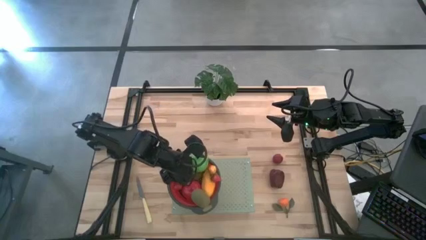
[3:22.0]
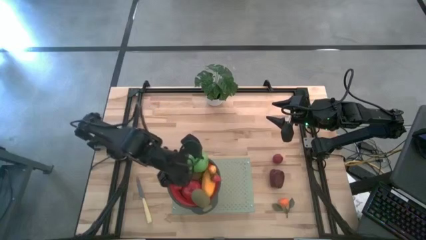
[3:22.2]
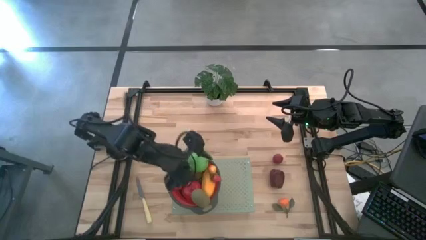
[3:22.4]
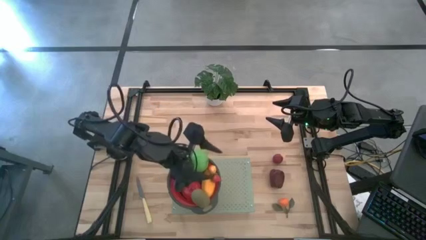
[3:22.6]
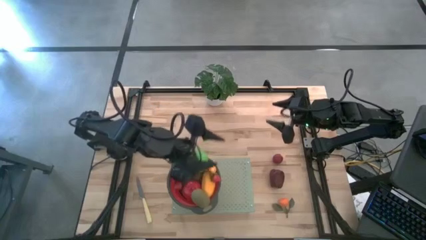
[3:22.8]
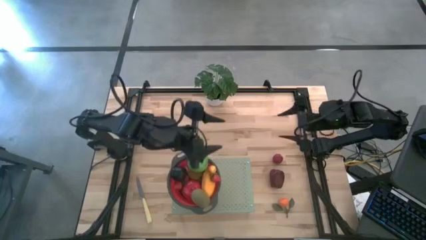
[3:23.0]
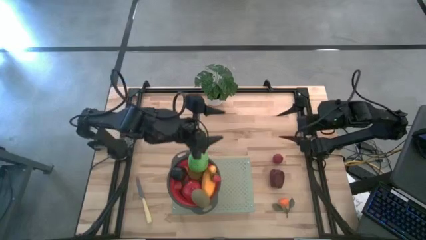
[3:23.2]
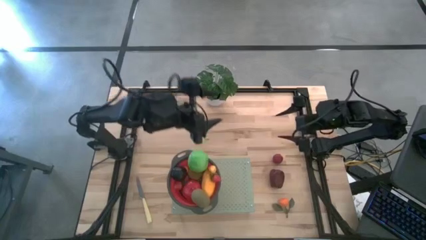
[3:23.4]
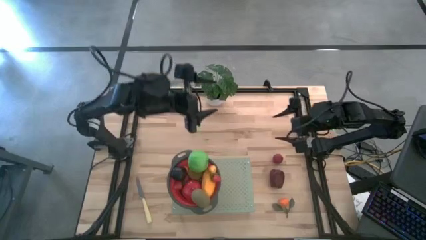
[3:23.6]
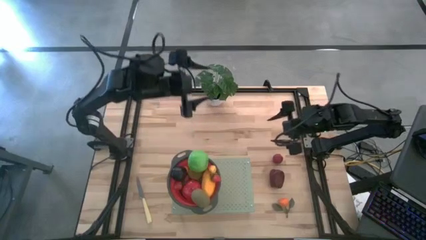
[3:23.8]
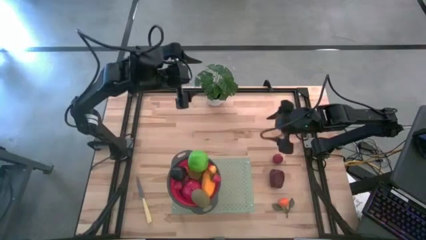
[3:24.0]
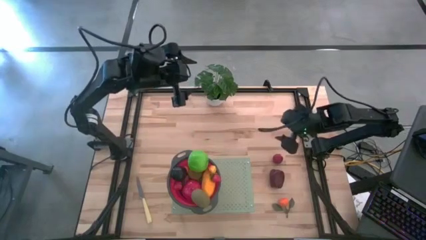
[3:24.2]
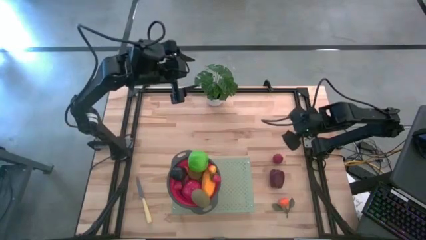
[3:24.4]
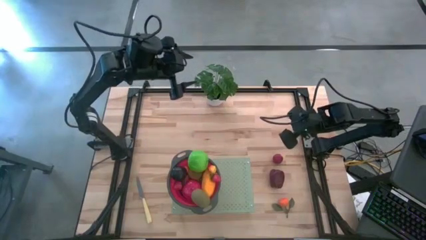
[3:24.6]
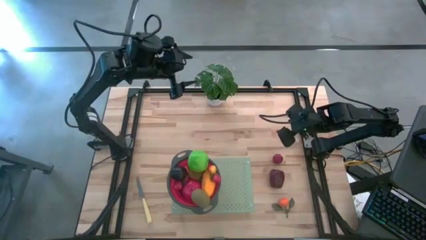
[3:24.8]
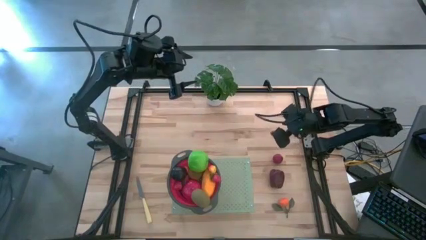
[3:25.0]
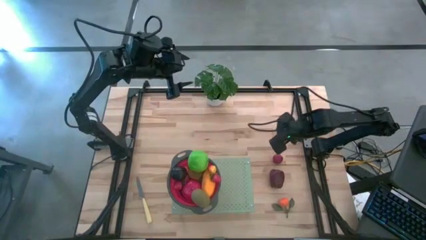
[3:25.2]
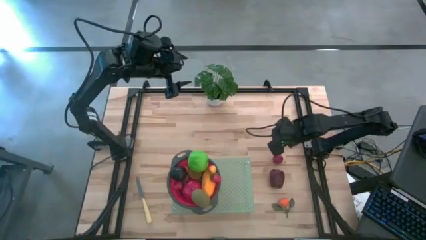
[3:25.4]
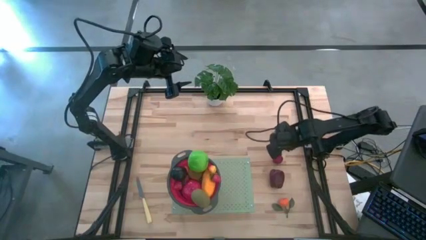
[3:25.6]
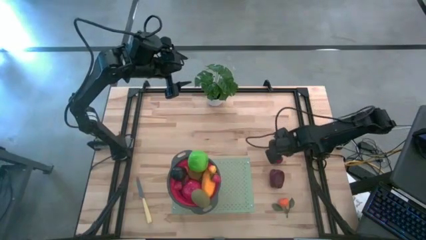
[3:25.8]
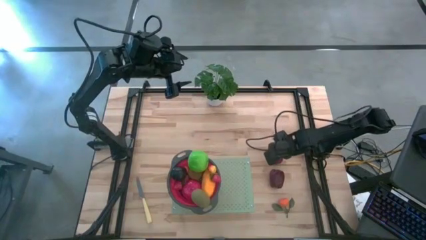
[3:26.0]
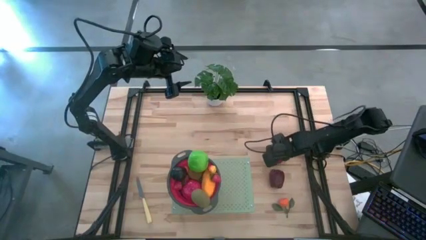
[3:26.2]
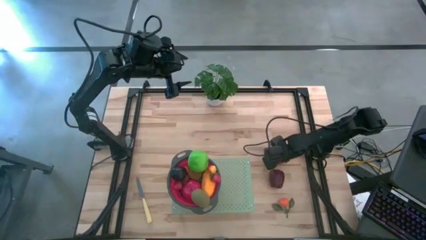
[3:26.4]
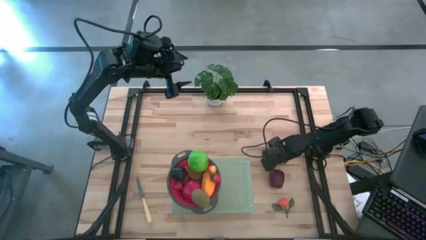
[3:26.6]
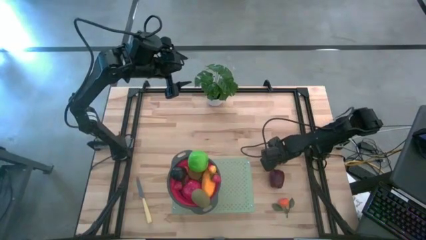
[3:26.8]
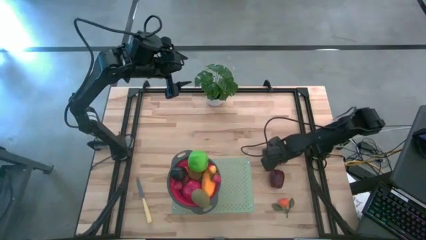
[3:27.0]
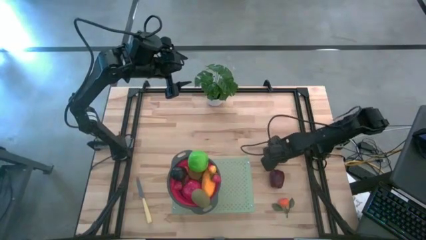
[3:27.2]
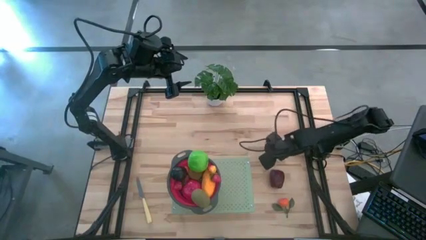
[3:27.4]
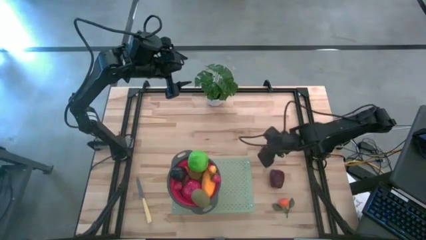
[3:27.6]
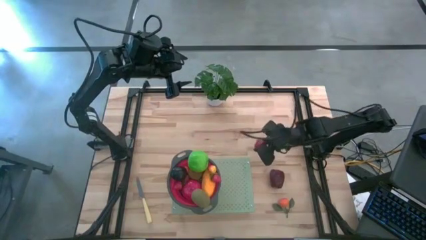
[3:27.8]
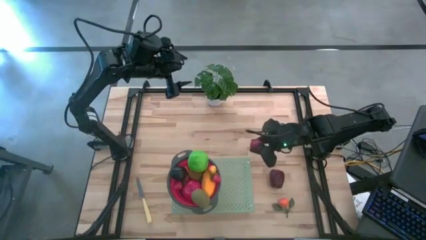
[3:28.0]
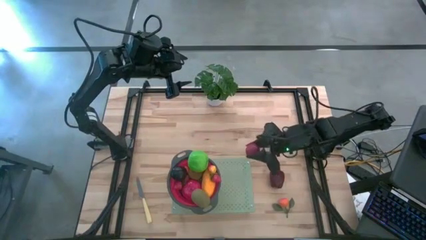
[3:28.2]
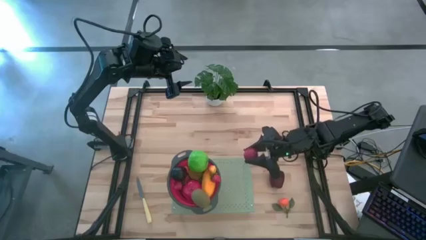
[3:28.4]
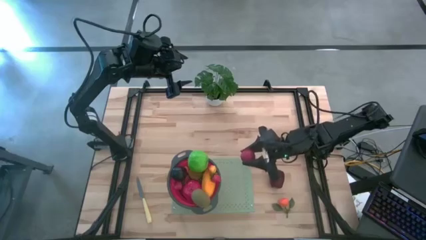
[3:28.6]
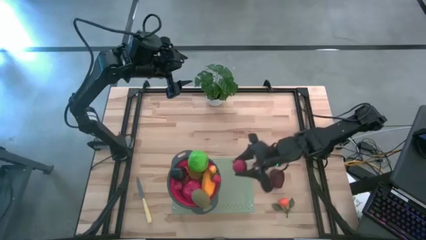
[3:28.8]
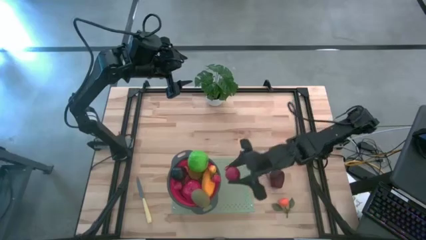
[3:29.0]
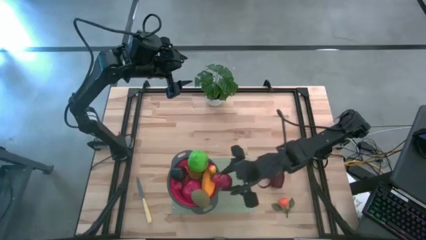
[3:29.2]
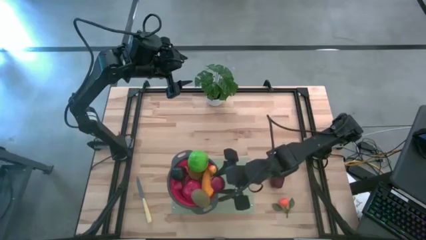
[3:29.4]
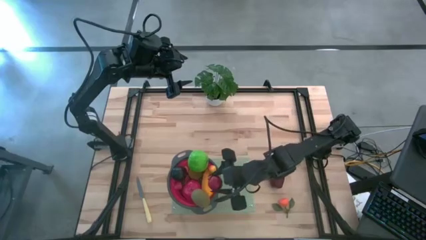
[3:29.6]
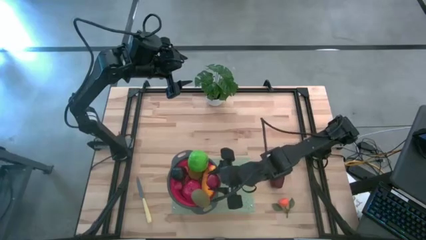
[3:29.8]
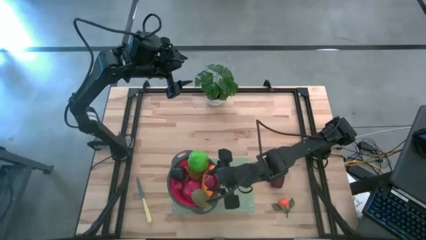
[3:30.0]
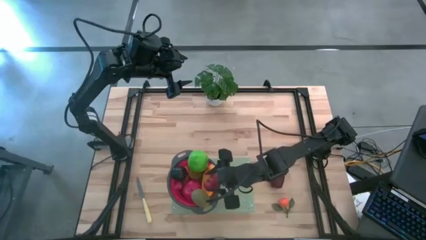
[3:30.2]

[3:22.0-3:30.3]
Task: Pick & Place Fruit
Put the pomegranate into the red strainer

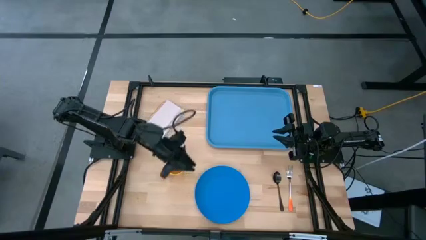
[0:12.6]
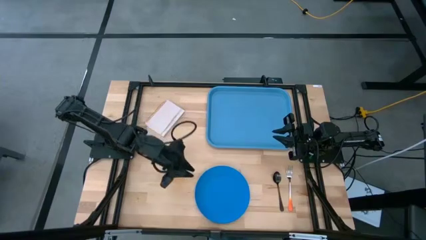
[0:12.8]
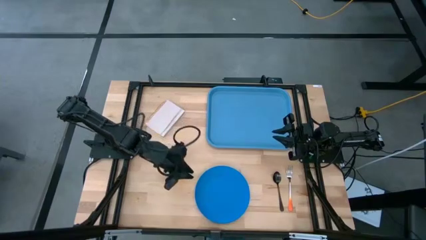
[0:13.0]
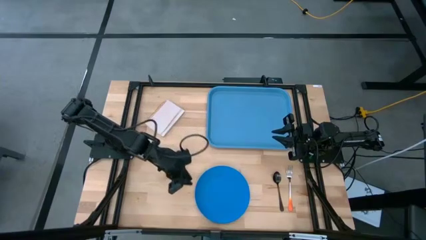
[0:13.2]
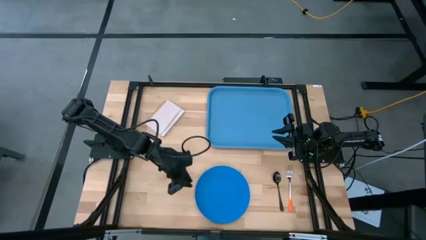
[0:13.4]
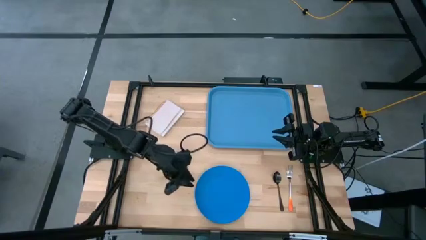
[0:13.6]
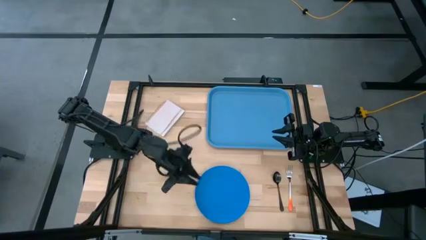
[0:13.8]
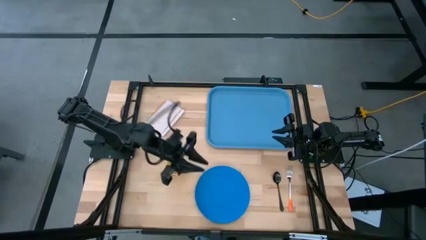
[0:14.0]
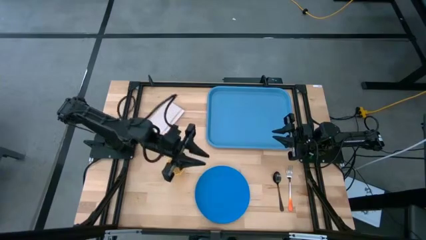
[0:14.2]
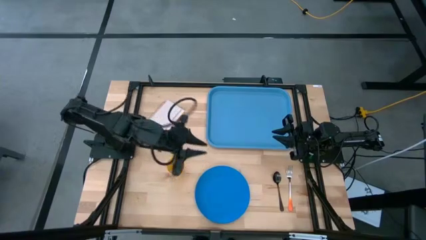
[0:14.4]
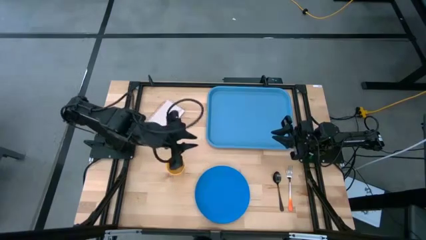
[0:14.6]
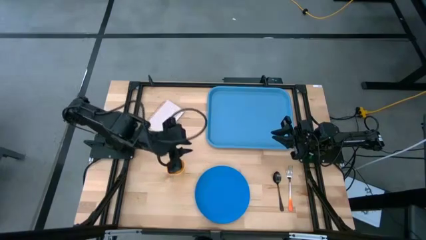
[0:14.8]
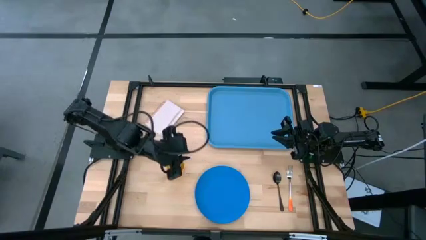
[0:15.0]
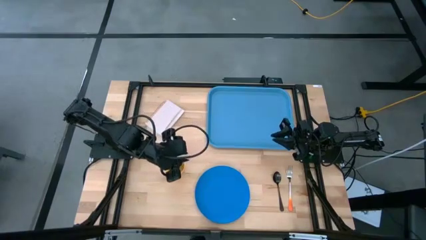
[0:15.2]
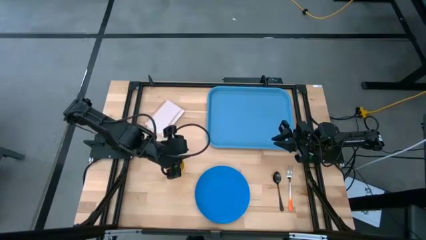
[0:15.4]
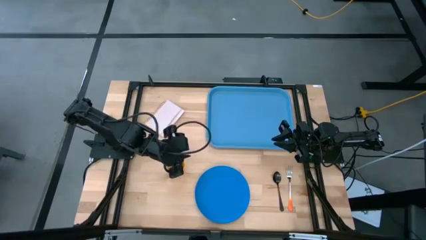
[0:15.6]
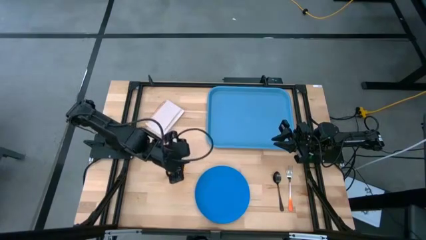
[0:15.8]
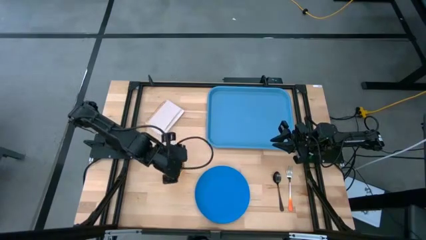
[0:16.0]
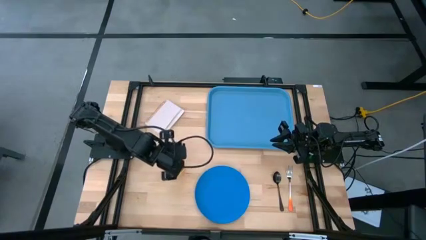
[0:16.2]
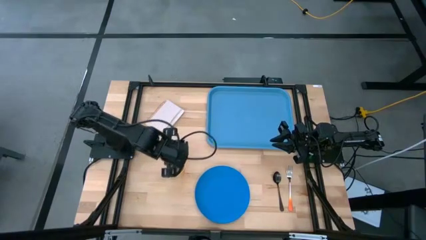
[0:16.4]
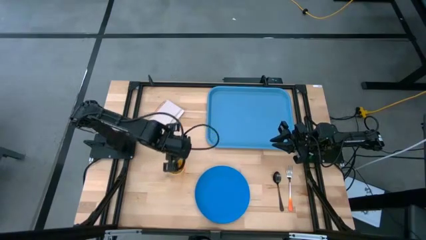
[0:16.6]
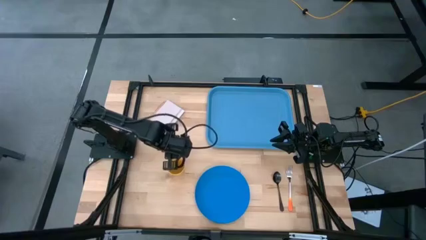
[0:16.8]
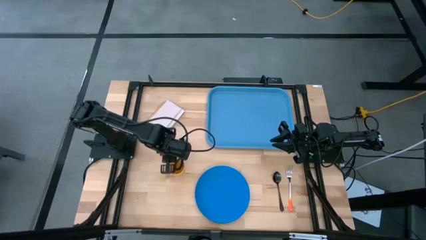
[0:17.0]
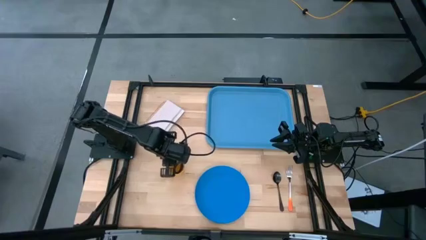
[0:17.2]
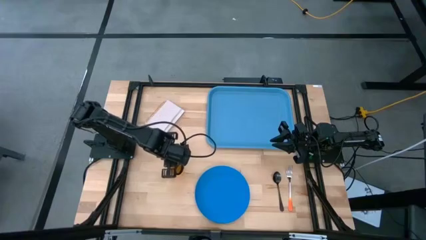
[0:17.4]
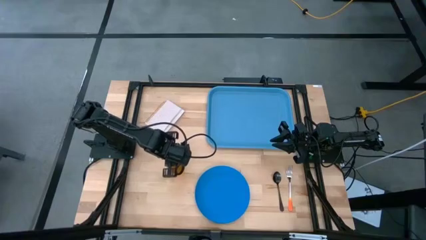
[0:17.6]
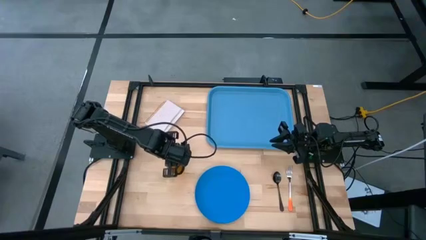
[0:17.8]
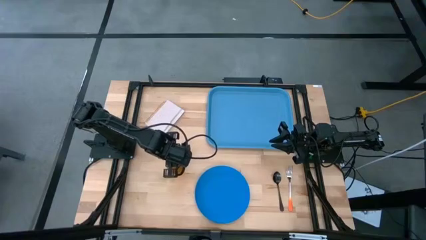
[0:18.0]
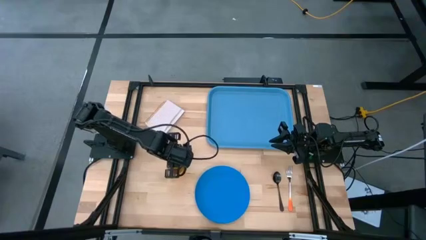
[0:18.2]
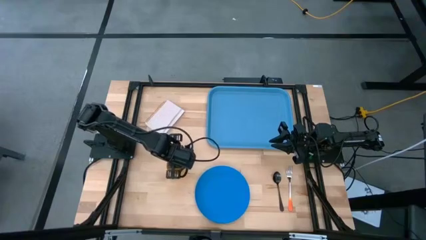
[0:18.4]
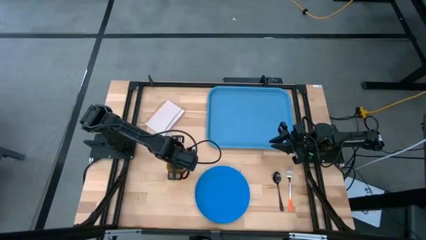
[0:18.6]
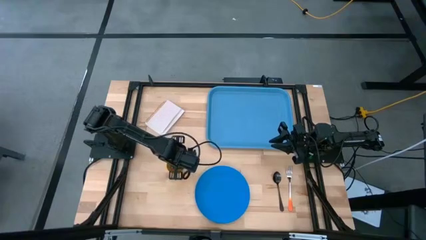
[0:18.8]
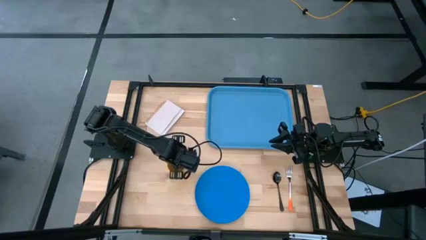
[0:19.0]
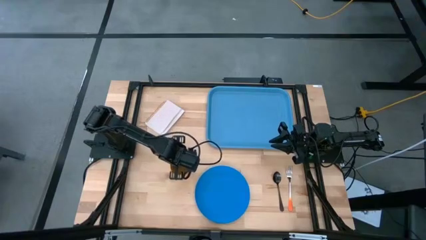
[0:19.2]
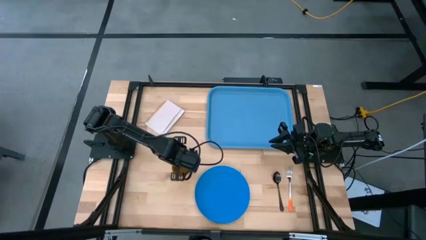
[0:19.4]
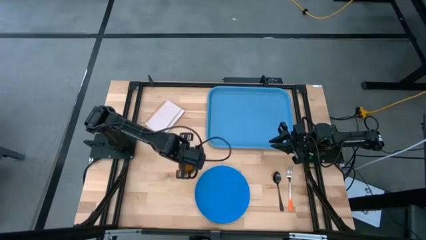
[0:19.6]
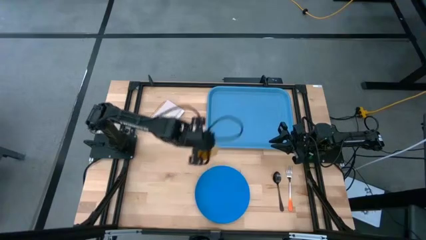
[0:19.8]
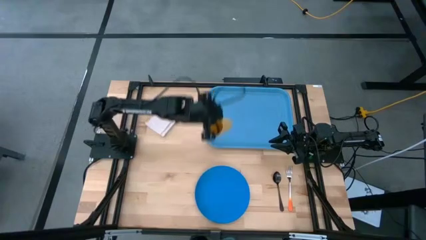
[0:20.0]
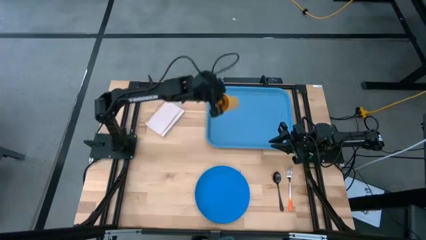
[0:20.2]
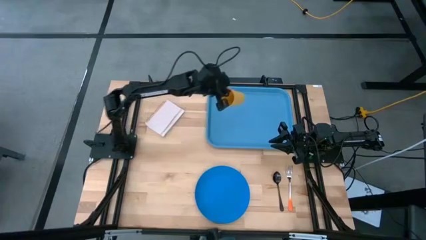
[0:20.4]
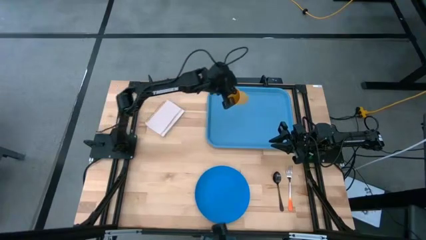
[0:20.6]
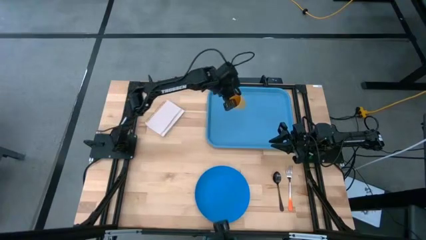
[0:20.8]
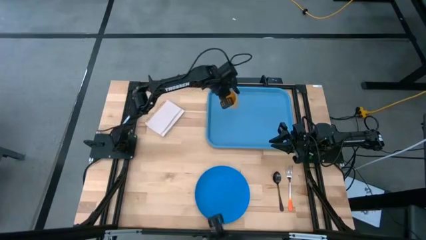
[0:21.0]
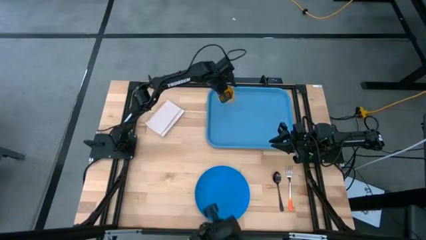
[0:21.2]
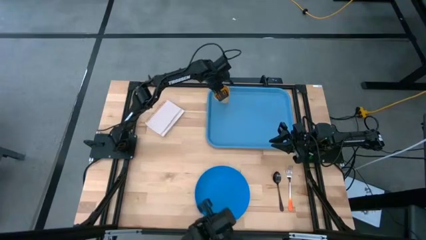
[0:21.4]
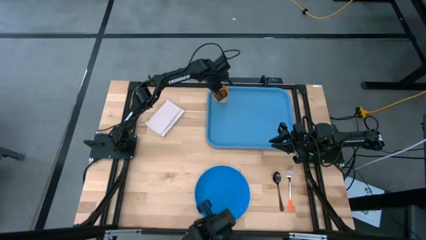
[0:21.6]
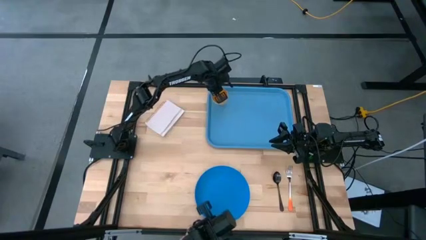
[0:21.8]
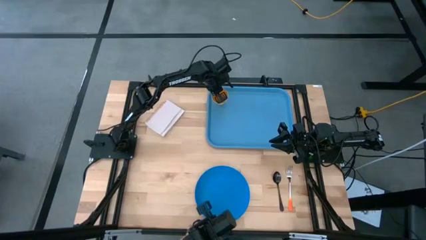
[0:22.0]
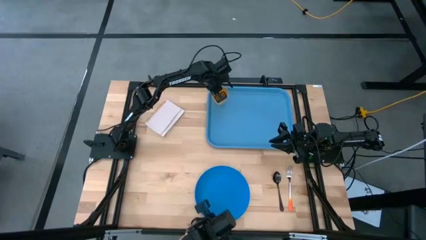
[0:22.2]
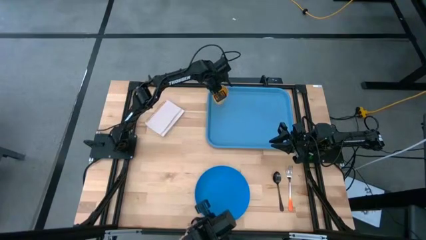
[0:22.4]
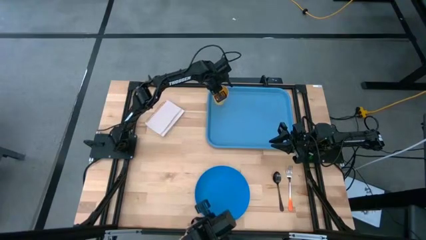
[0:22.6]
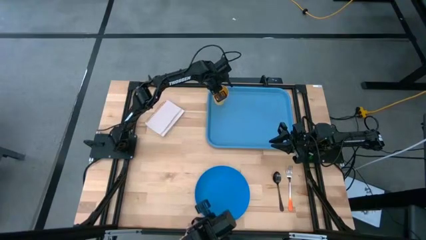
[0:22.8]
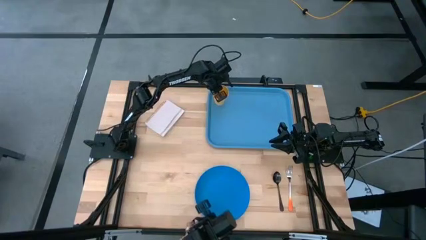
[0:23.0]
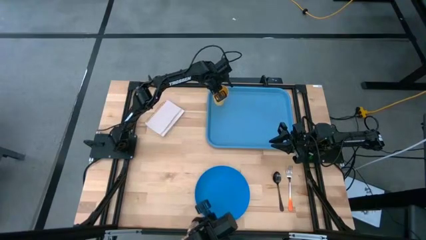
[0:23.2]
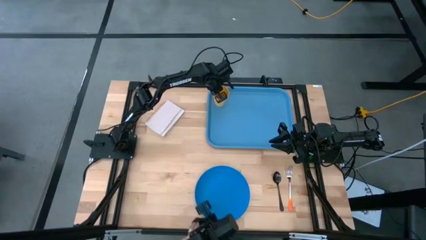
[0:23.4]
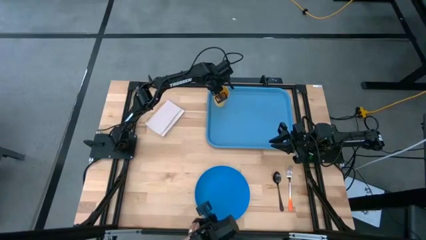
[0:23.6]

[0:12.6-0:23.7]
Task: Pick and place plate/cup/fork/spoon on tray
Put the yellow cup on the blue tray
